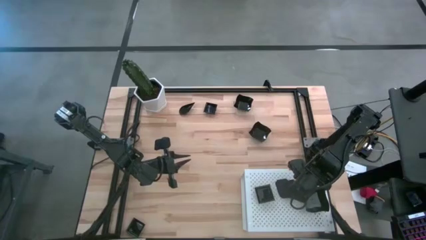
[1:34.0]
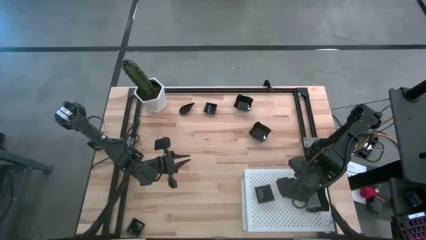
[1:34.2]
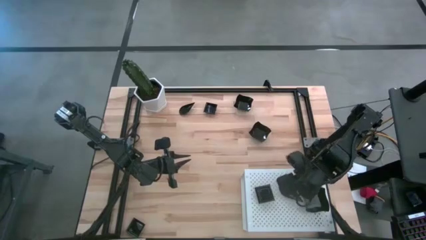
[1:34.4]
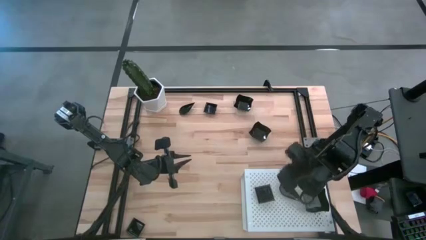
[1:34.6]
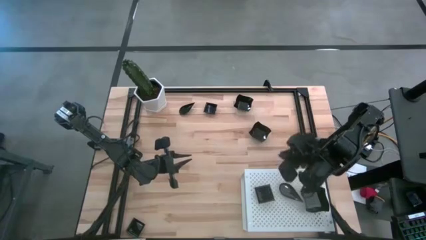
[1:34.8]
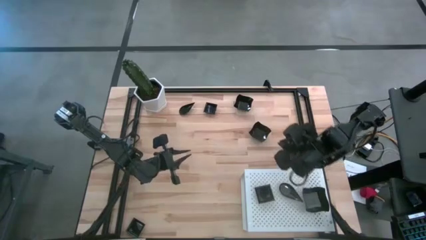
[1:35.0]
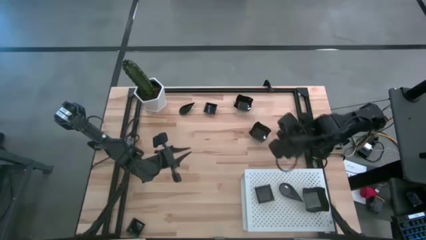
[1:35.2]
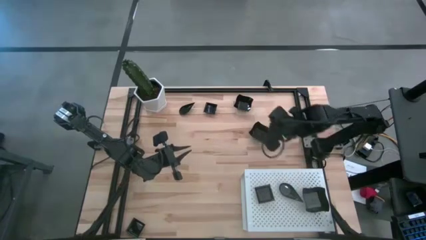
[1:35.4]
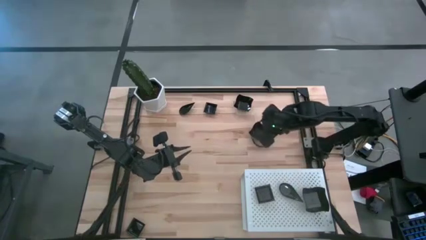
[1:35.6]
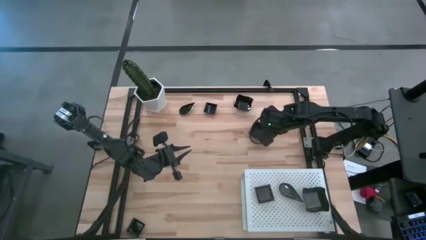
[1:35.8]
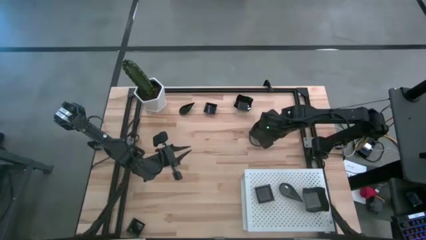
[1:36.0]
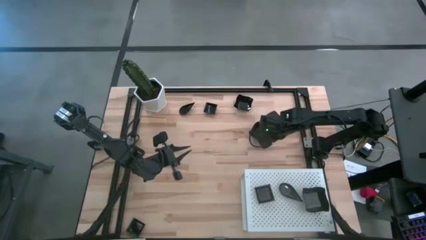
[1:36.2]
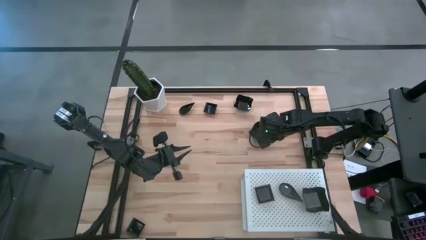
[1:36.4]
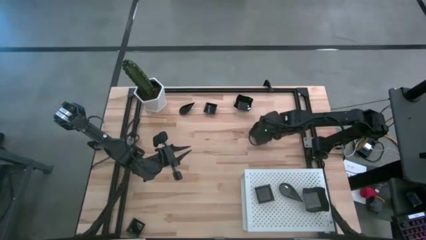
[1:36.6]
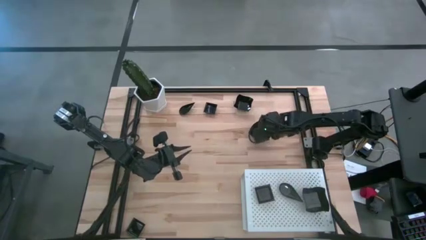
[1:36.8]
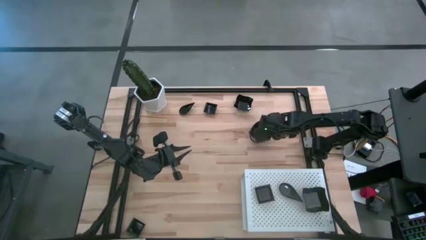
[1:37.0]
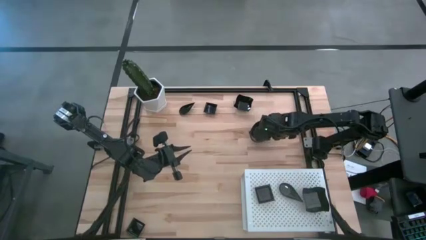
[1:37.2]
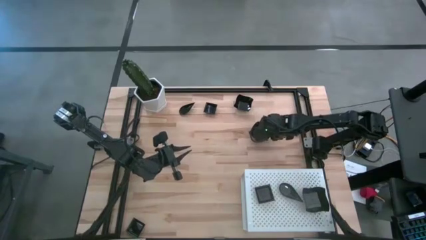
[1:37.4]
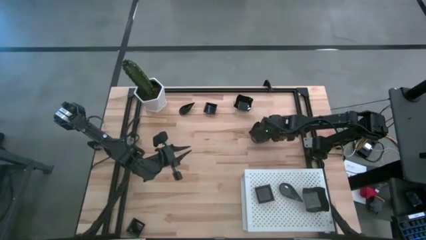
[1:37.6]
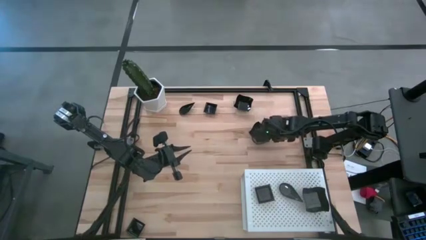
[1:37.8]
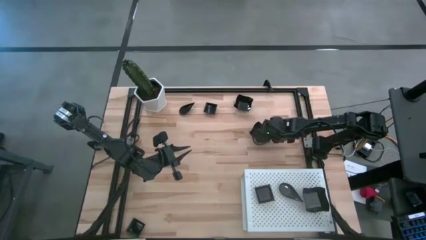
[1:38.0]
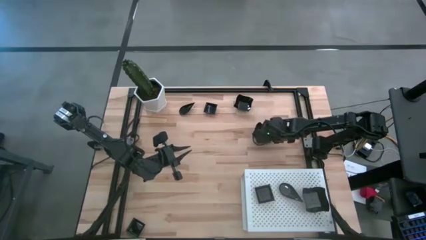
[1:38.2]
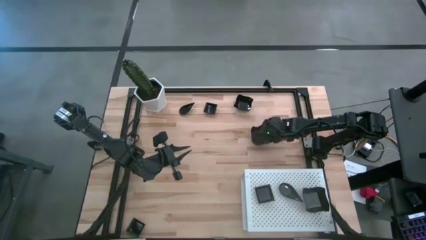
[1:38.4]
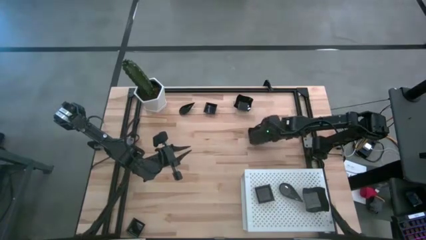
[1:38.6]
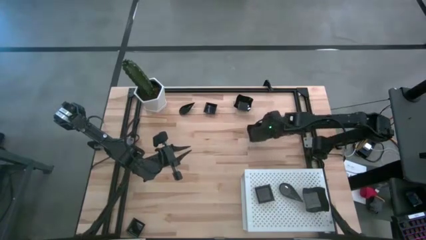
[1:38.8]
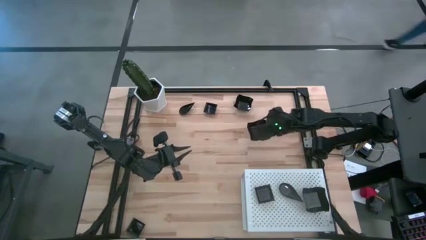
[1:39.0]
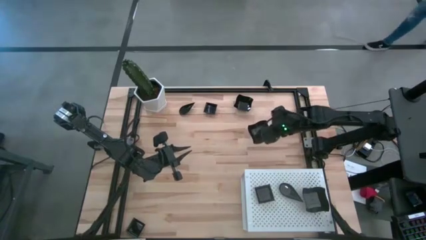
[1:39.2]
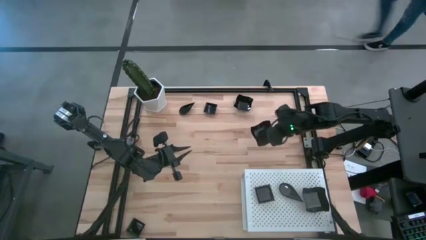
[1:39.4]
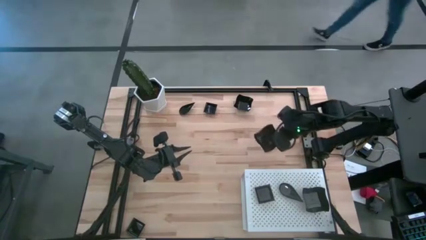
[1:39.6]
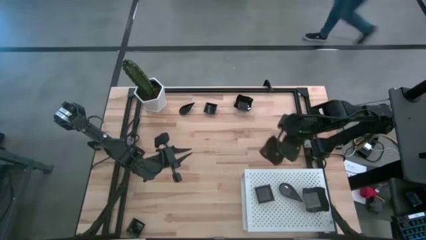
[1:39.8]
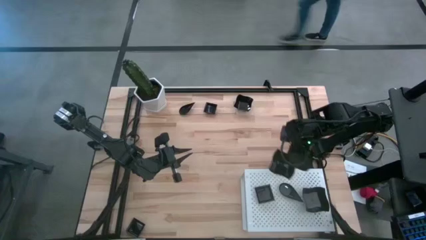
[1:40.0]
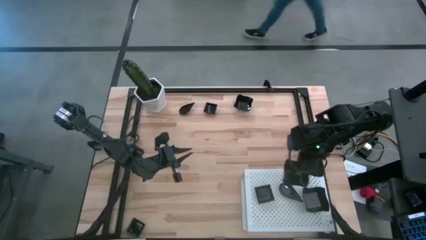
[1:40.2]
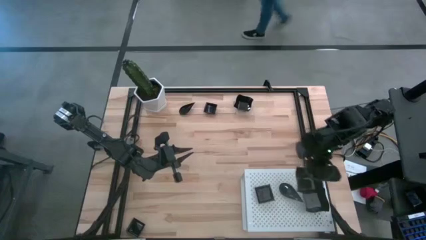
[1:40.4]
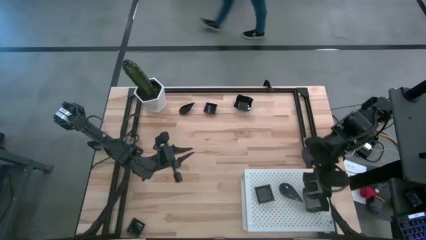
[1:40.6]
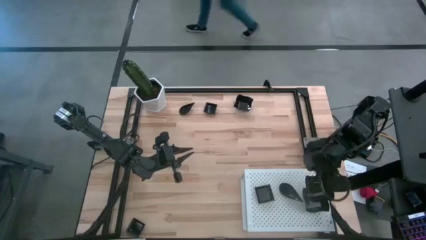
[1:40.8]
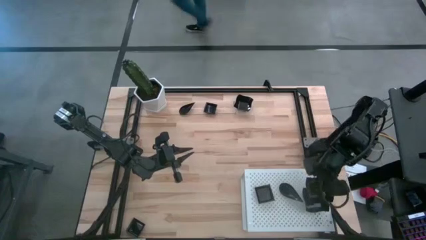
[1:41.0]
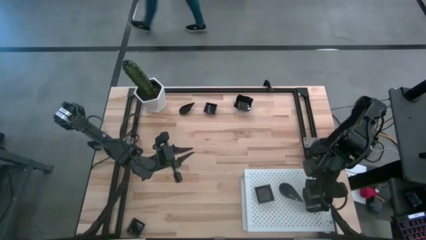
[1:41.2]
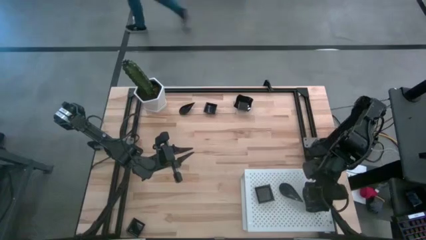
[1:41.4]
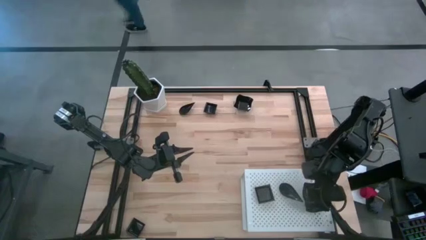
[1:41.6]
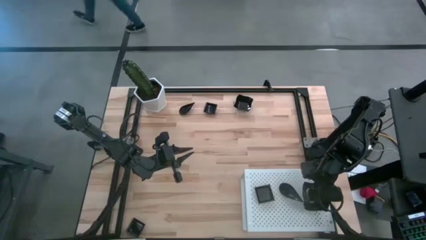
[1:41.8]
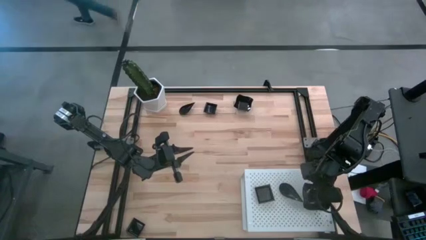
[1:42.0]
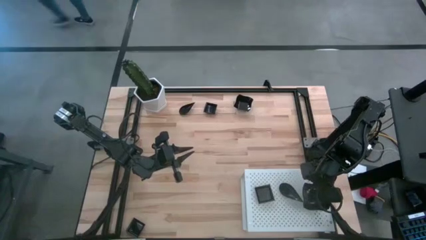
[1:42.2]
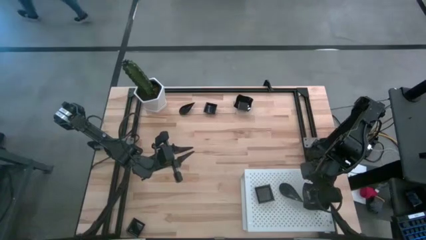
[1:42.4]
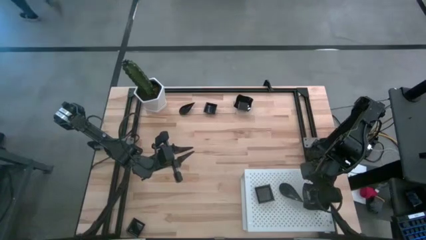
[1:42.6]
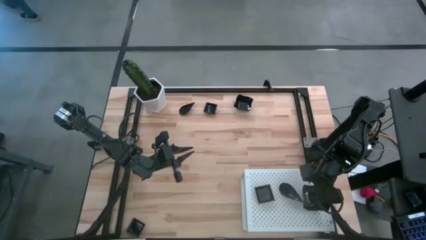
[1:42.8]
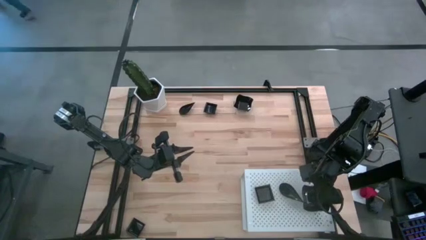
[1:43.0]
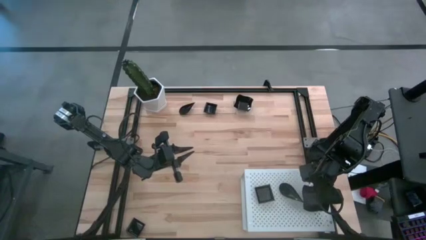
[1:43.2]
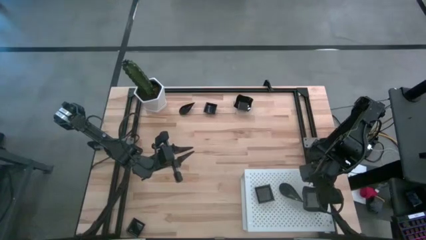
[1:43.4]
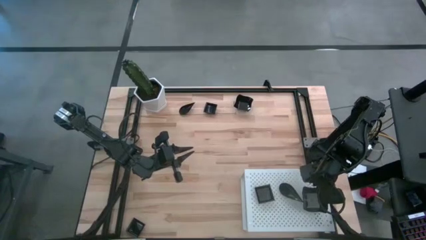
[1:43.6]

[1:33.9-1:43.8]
Task: Pick & Place Mini shaped plates
Stack the square plate on top of the other square plates on the shelf

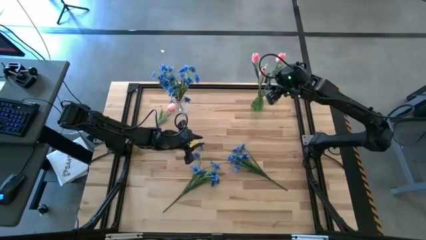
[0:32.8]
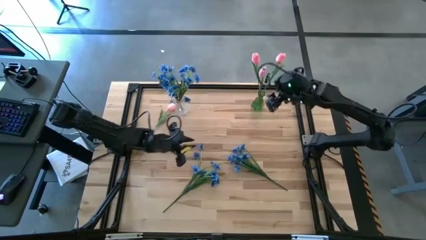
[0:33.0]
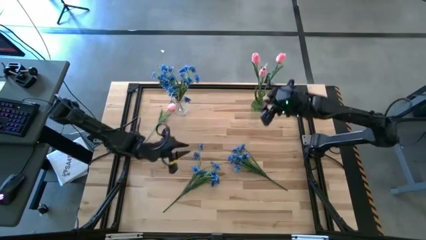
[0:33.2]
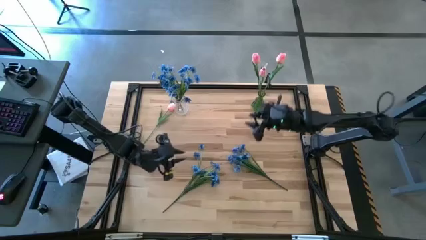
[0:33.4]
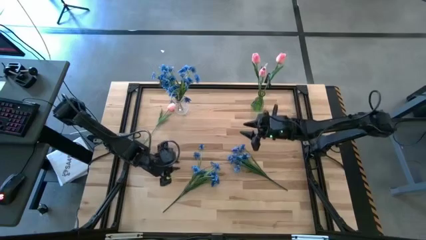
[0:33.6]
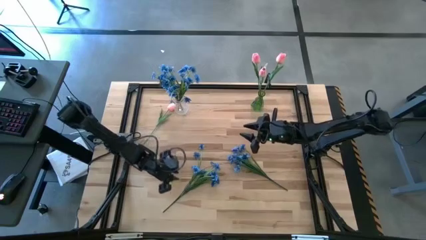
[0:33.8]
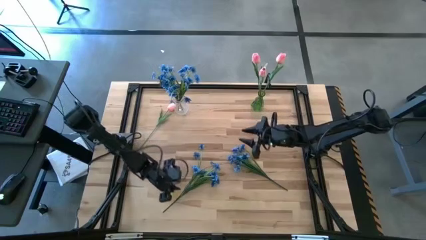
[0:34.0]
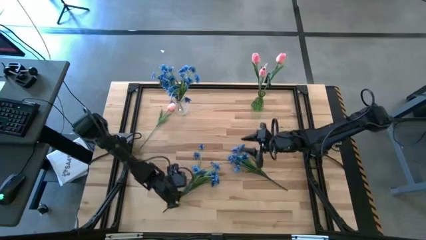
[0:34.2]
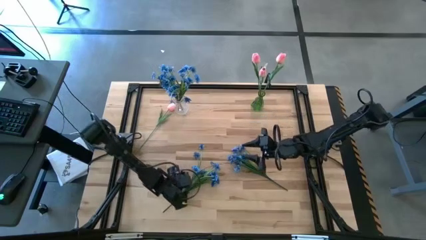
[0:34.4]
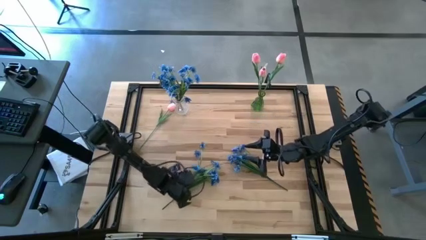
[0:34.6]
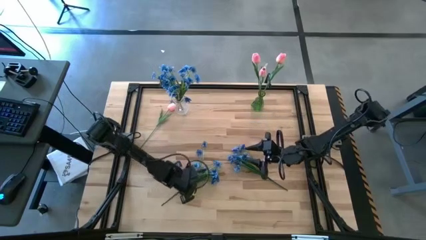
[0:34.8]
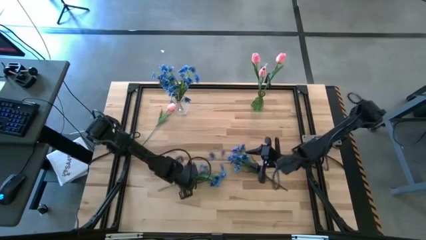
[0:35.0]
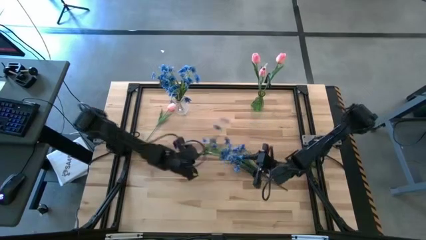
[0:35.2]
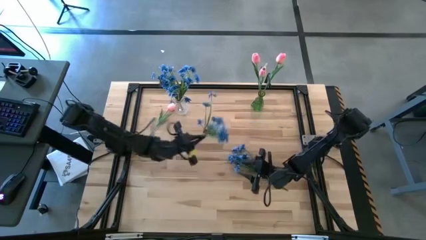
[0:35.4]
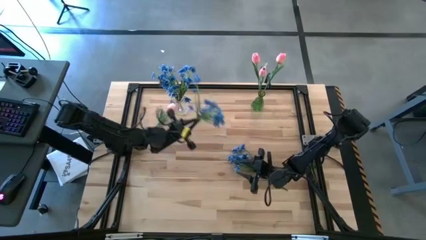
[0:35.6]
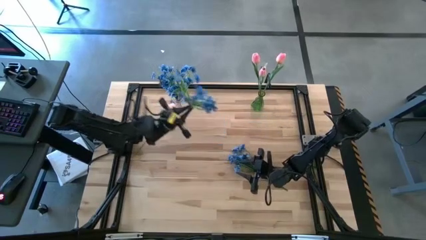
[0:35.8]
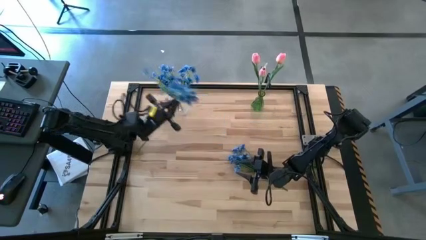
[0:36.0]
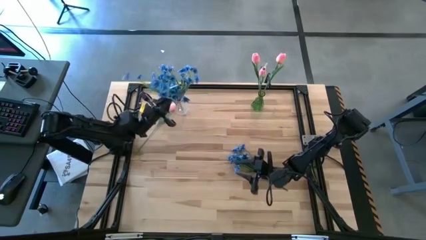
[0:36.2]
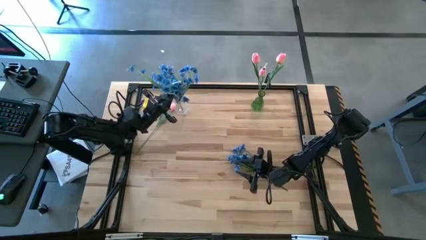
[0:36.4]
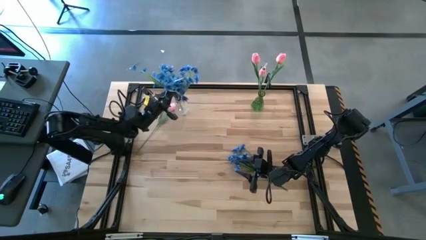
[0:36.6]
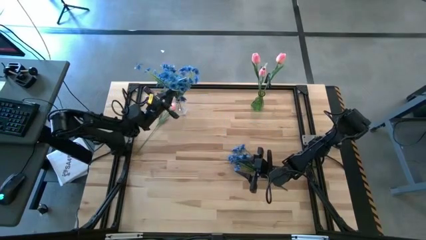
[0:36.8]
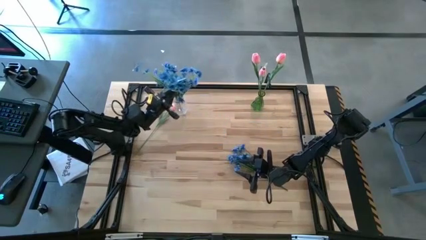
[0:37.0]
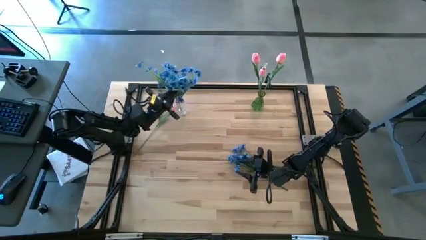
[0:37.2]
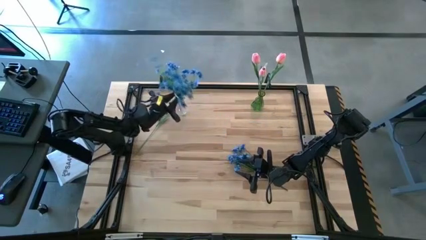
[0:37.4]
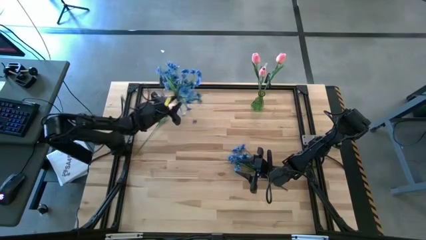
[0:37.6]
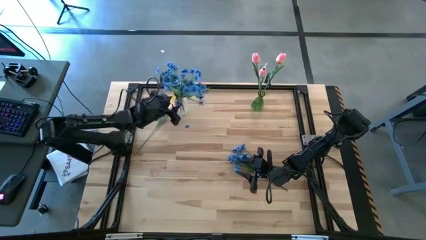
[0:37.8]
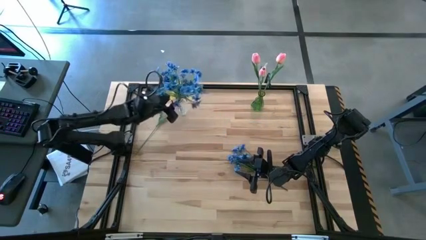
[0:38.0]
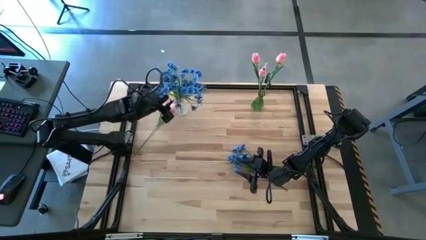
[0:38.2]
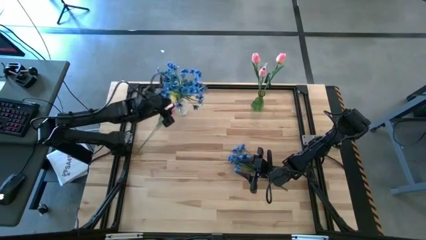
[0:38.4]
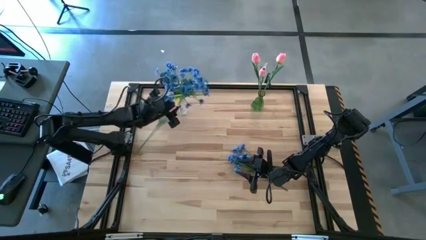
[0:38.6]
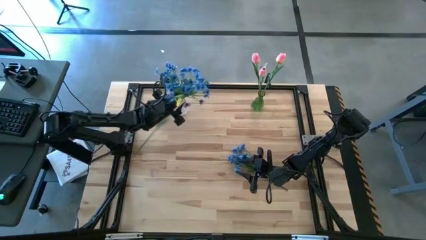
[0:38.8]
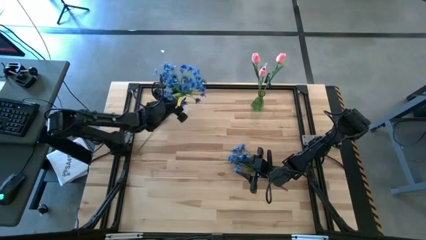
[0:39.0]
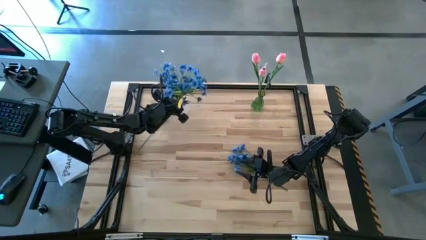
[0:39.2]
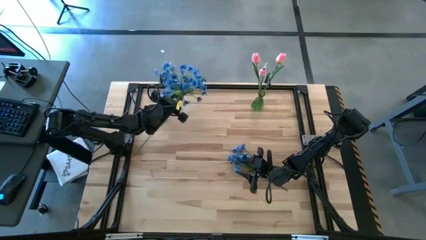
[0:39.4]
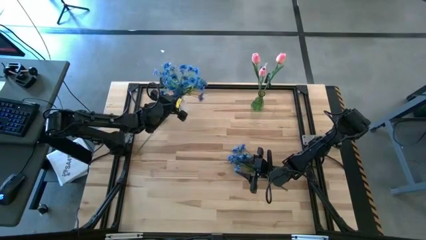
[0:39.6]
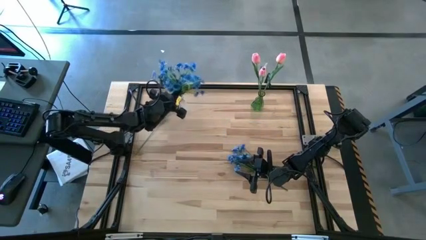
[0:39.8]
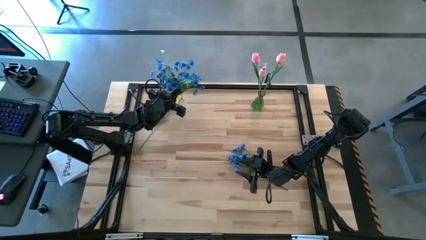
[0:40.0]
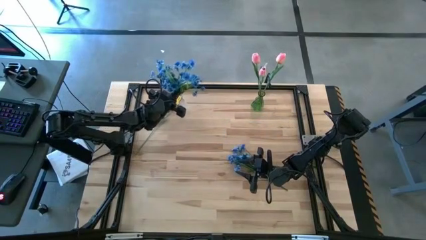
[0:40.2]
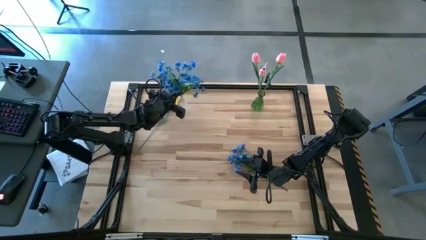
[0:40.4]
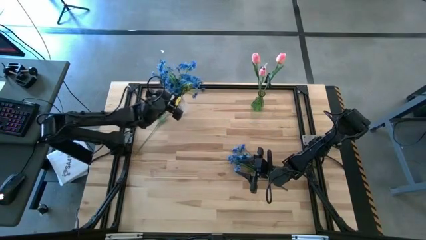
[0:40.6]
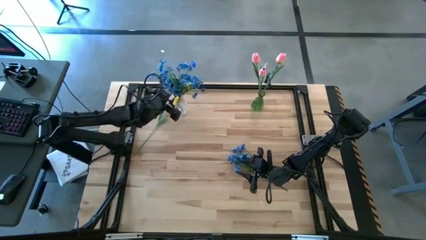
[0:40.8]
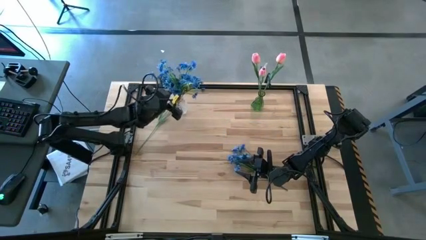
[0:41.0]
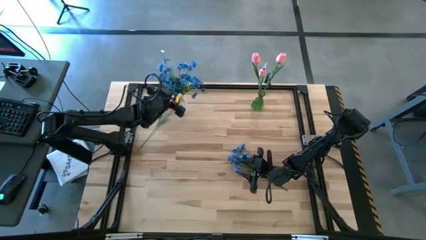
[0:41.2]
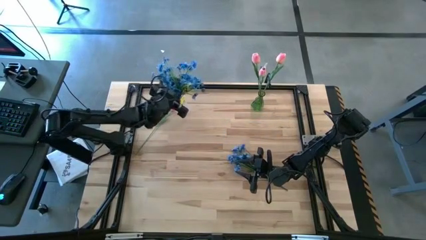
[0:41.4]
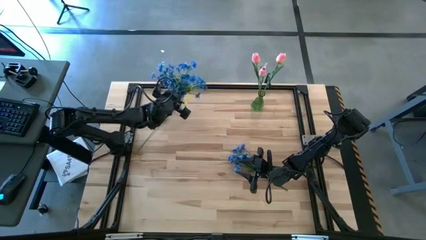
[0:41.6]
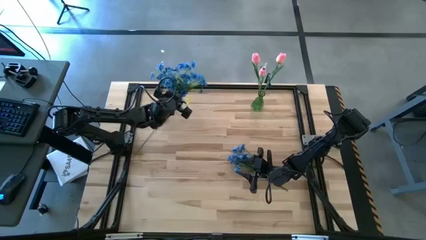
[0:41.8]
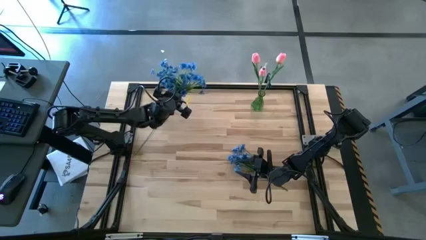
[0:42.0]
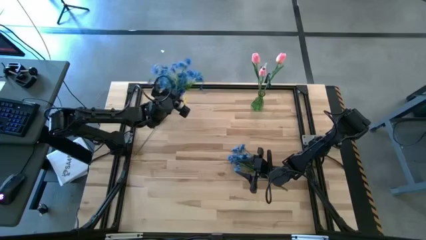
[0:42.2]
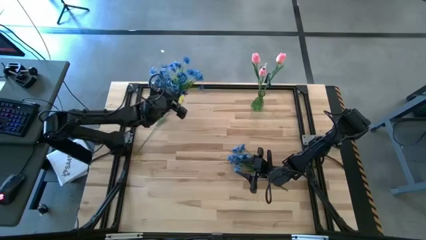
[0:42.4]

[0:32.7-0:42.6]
Task: Sort flowers into vase by color
Put the blue flowers into the transparent vase
